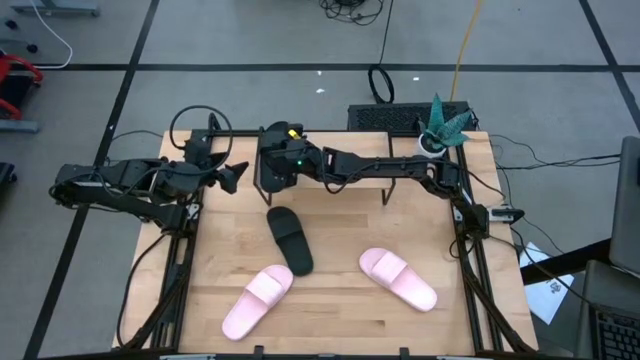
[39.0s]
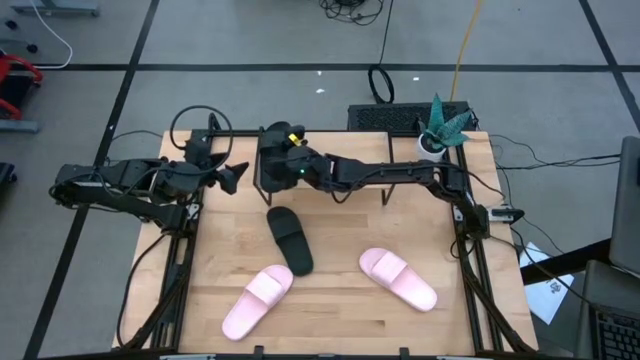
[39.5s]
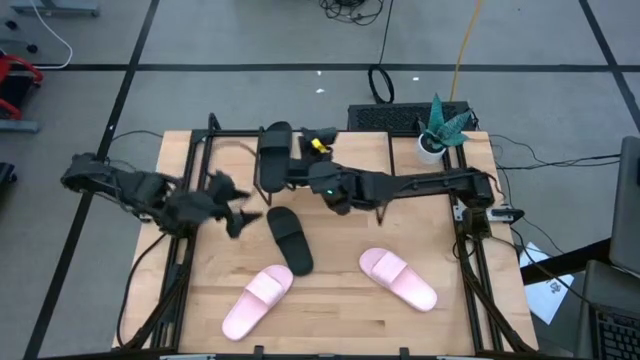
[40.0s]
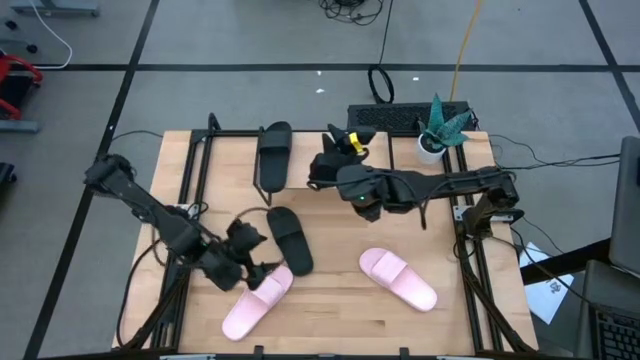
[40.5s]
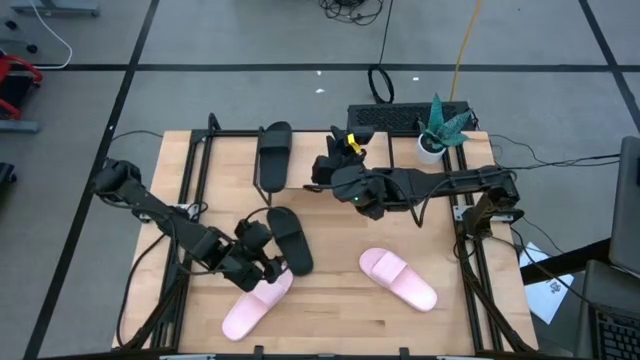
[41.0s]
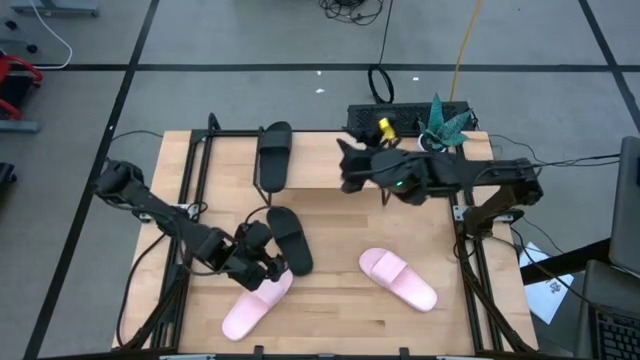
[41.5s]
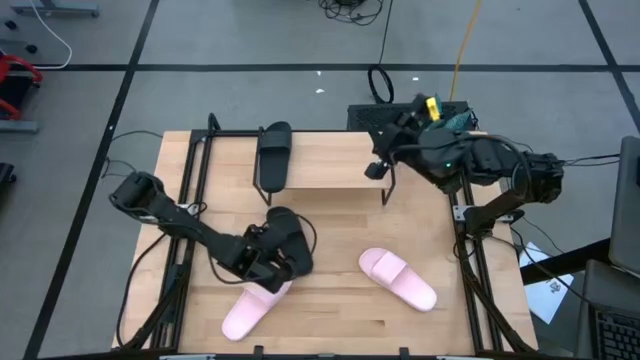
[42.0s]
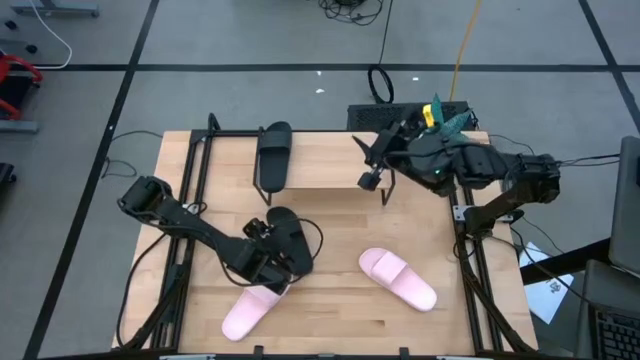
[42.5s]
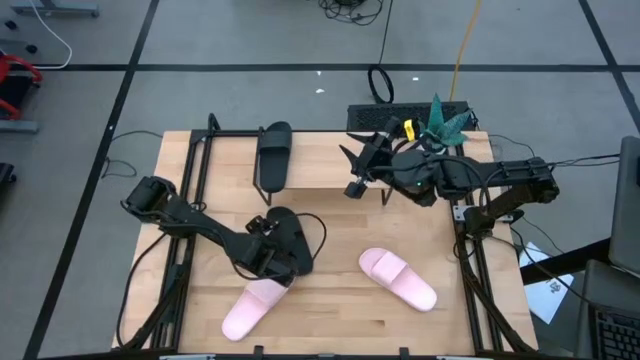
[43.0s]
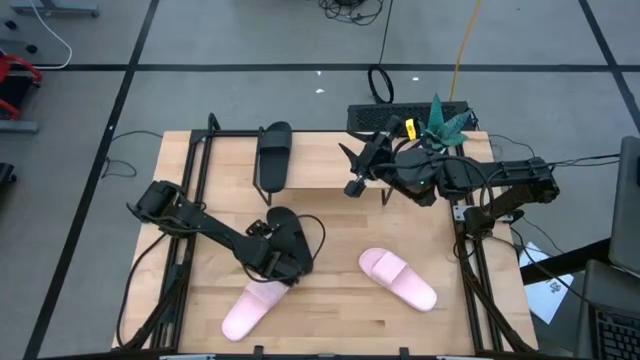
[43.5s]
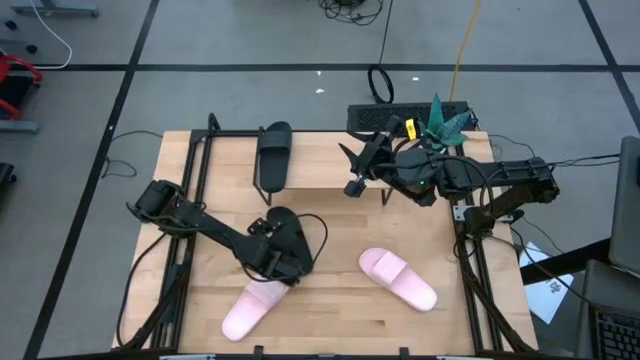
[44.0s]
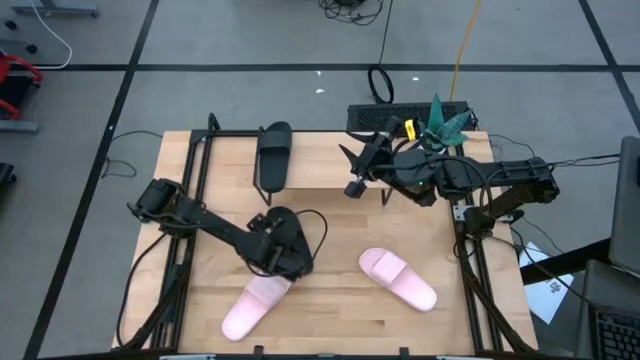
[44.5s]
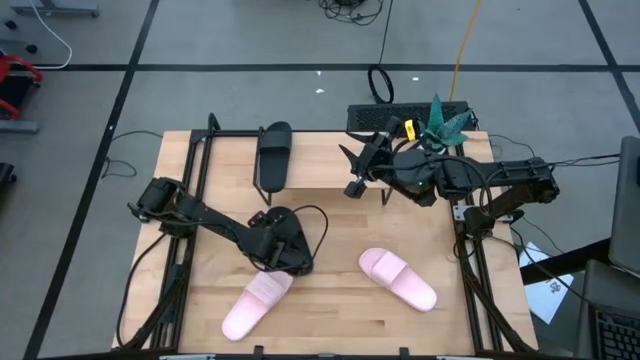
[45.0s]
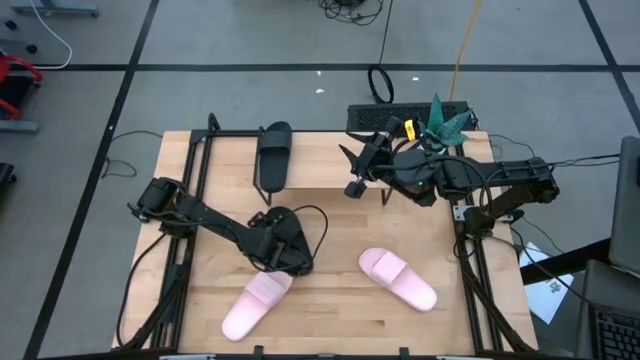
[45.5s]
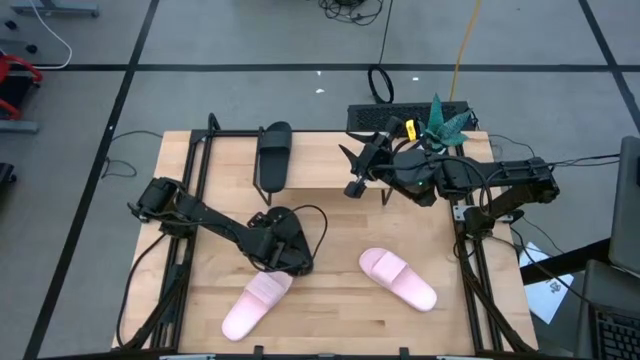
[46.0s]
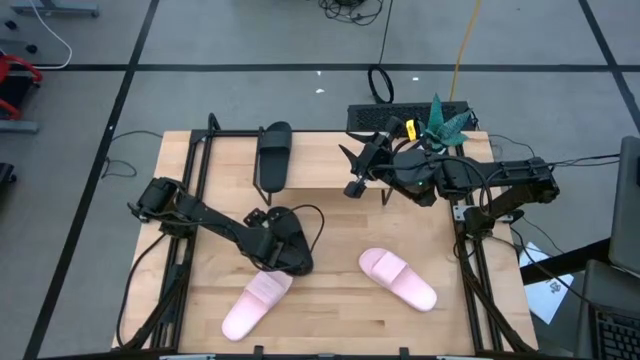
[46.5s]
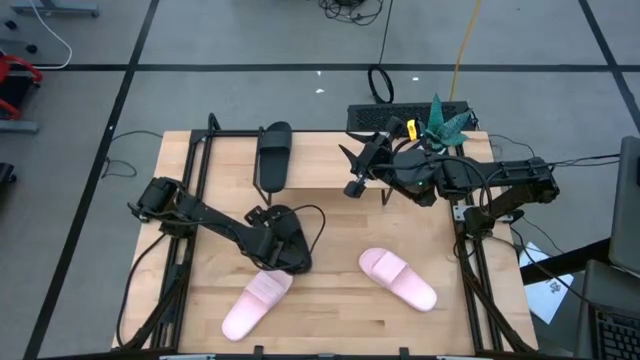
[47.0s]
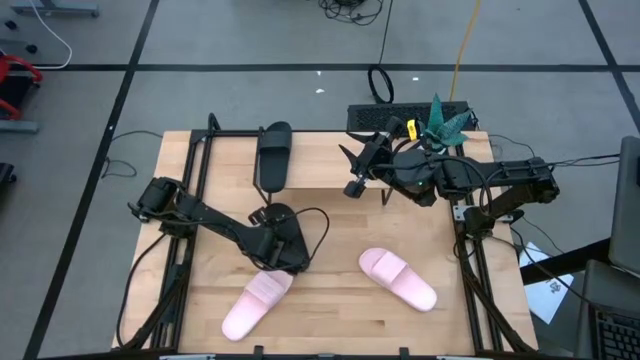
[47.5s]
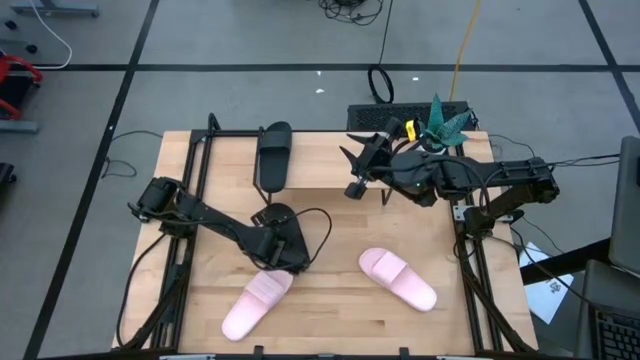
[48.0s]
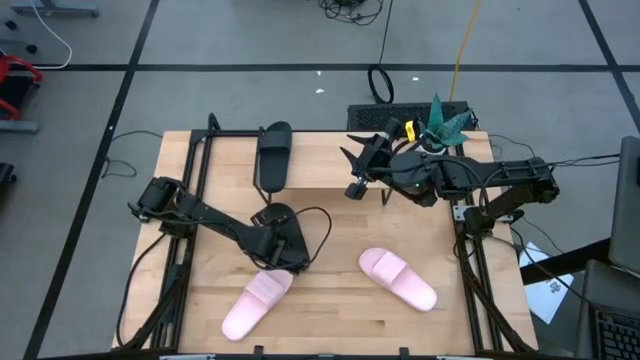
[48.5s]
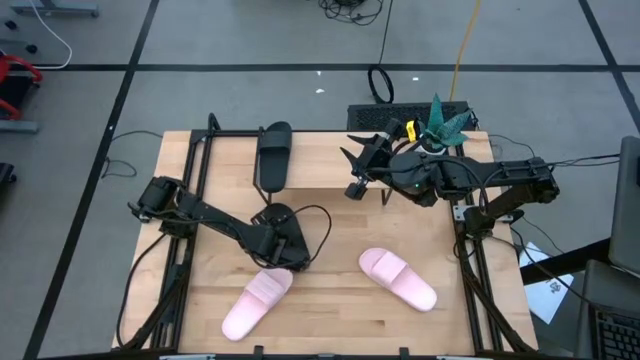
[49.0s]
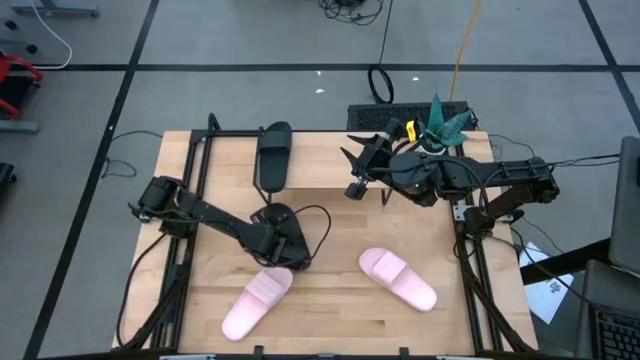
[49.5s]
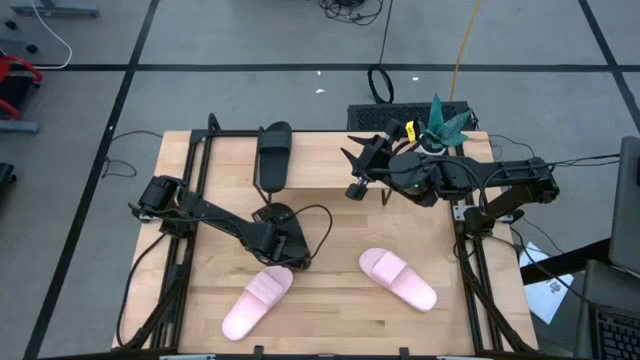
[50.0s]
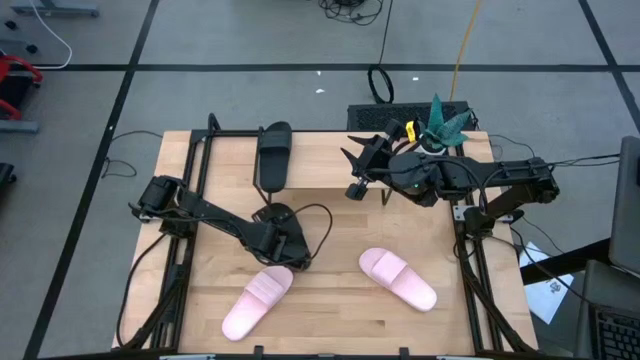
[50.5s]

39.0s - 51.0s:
Task: Pick and place slides into the shelf
Put the black slipper on the shelf

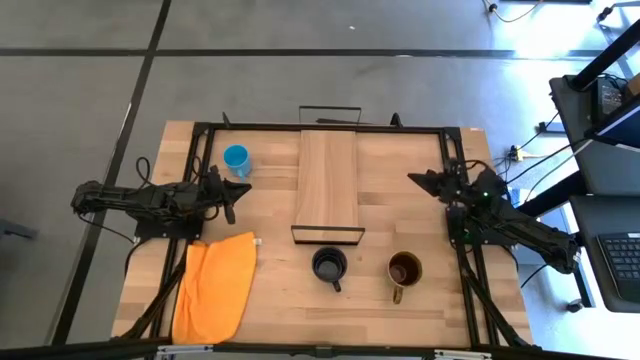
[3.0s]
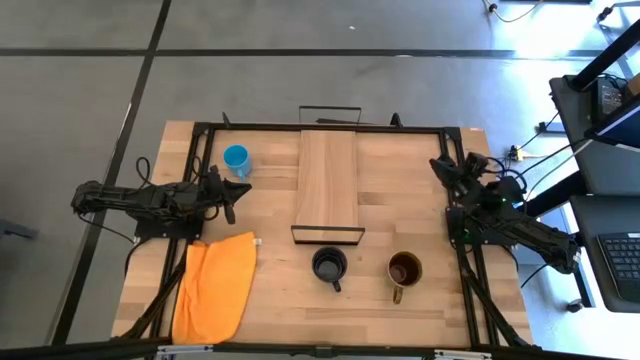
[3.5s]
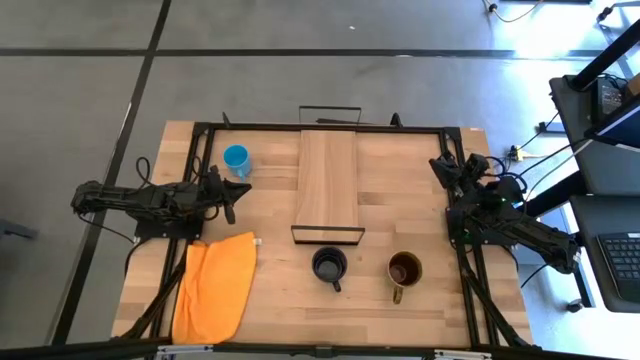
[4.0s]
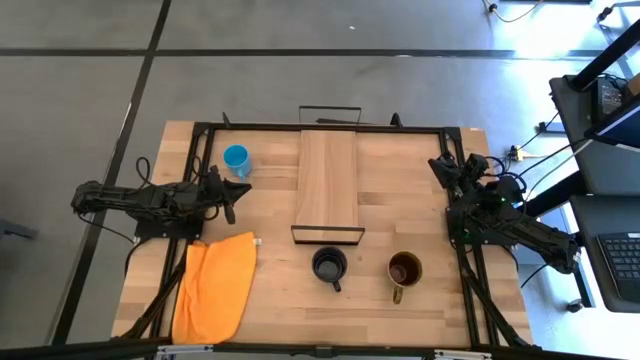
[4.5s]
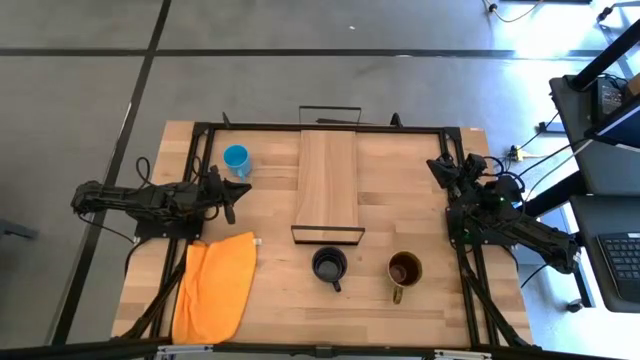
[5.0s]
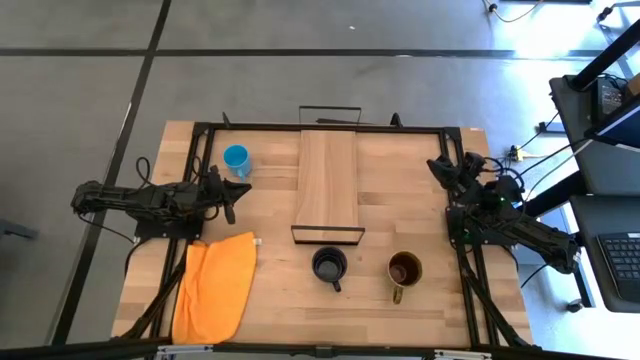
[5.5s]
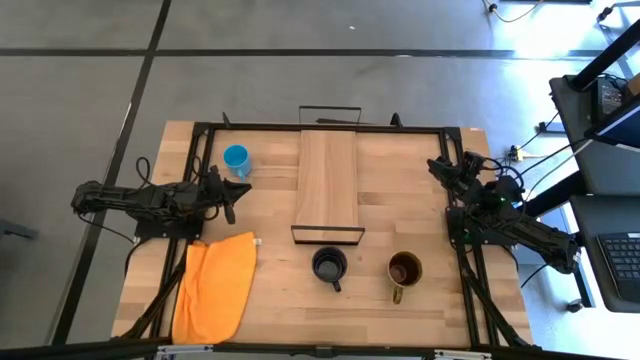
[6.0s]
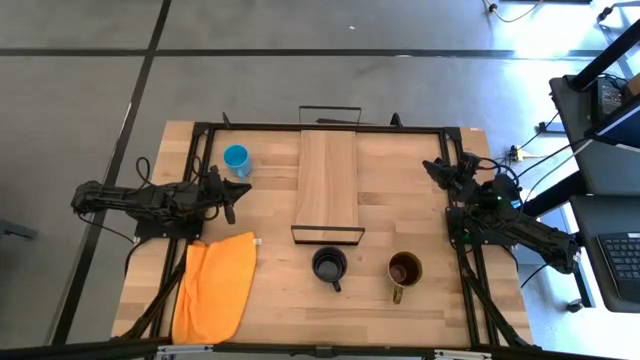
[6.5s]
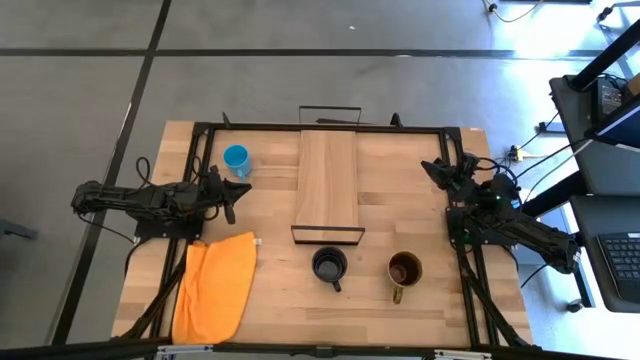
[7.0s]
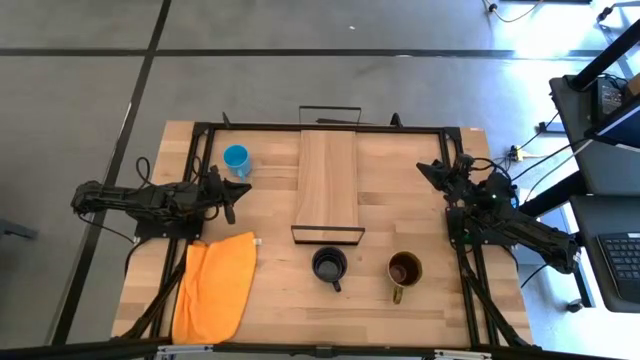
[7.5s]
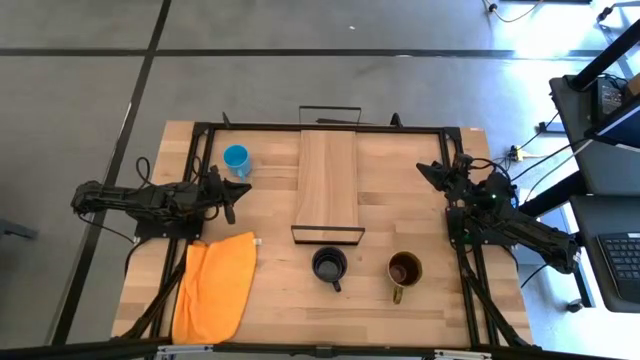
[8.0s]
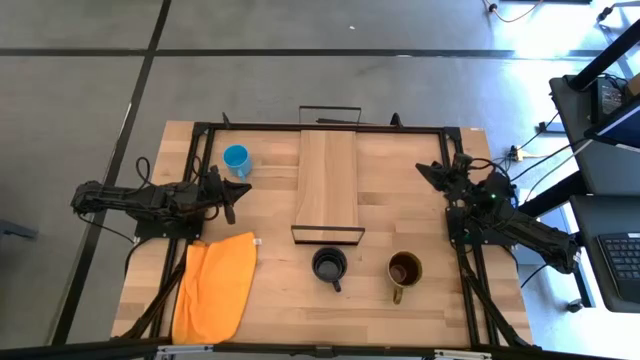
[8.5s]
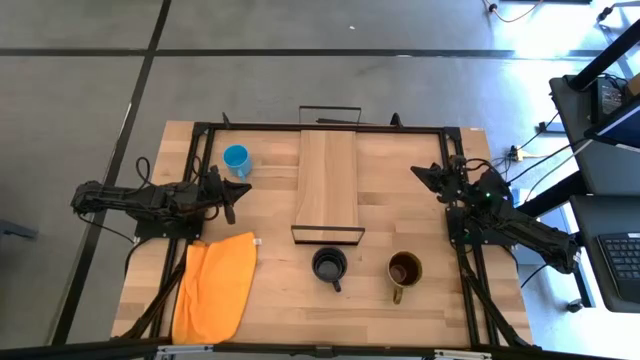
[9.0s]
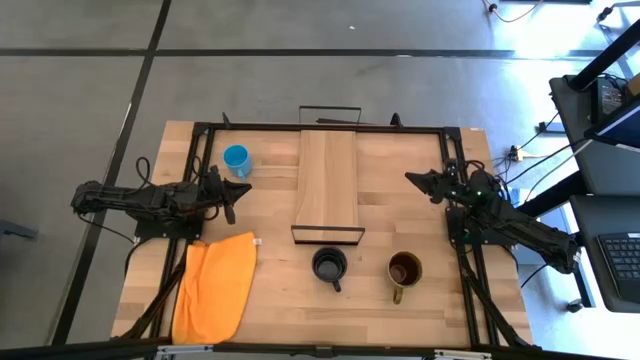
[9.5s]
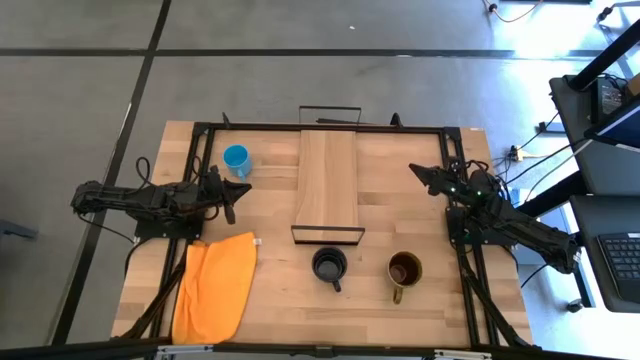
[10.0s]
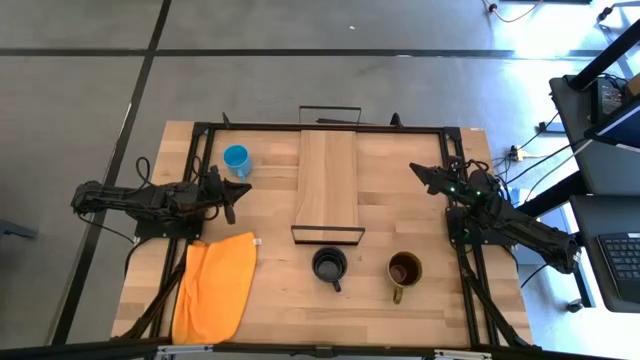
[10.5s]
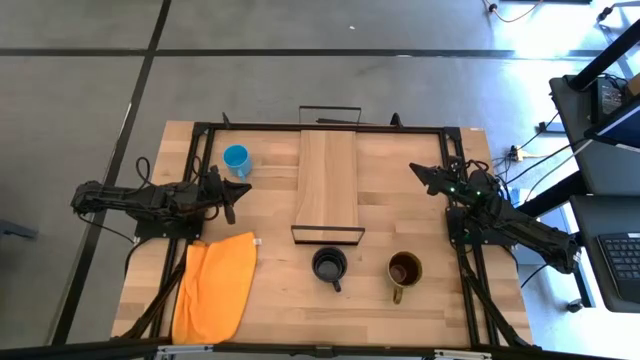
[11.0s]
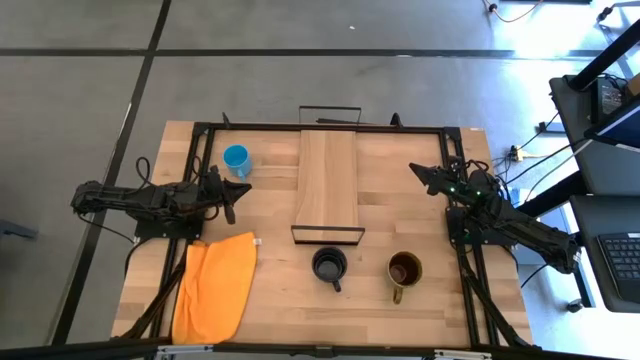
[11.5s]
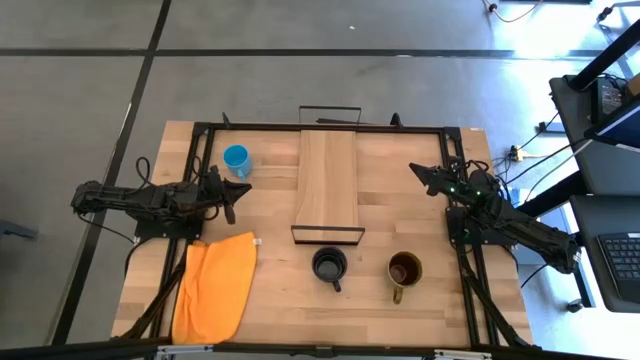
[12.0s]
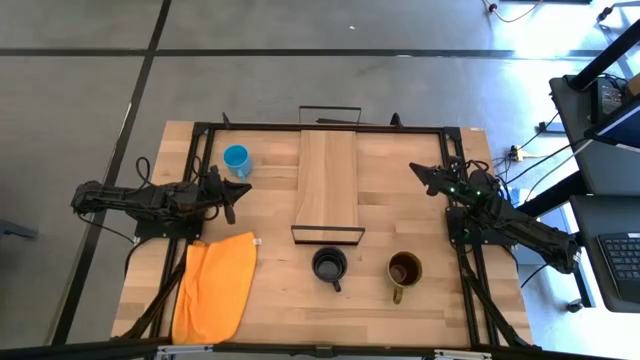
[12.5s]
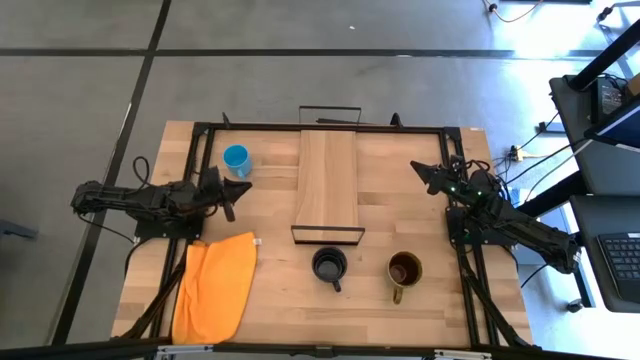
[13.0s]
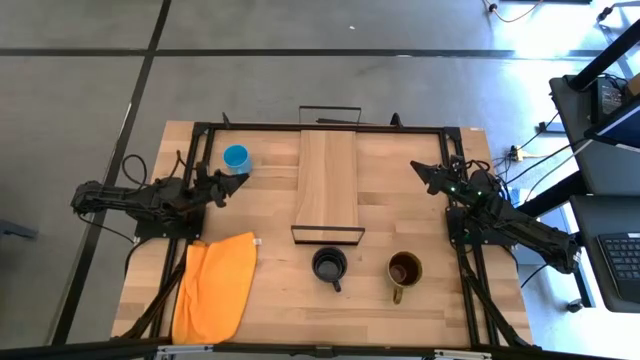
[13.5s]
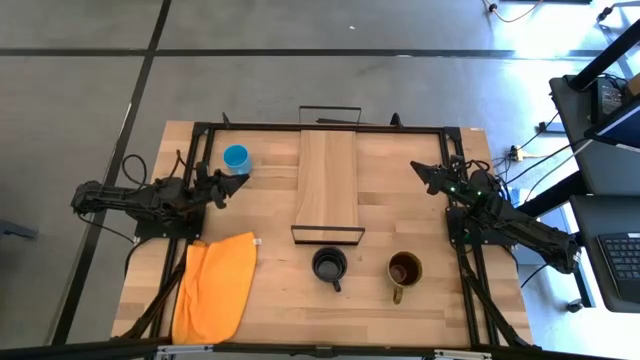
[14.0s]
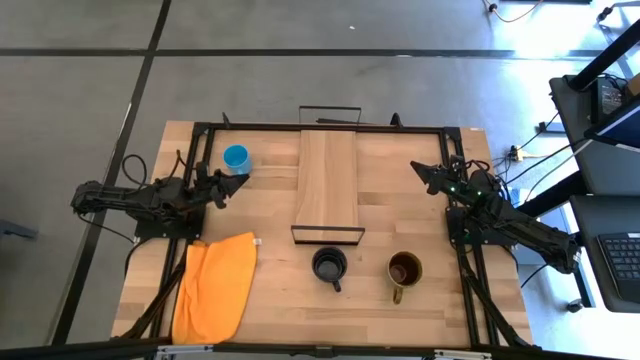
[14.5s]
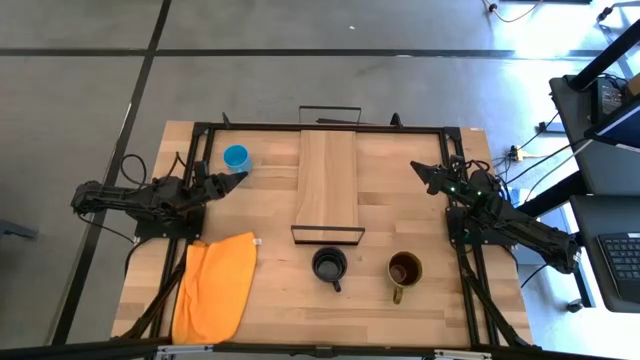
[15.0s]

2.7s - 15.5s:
Task: Stack small to large cups/mugs on shelf
Put the blue mug on the shelf
